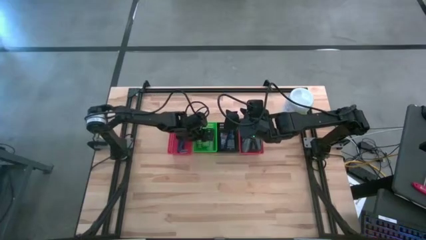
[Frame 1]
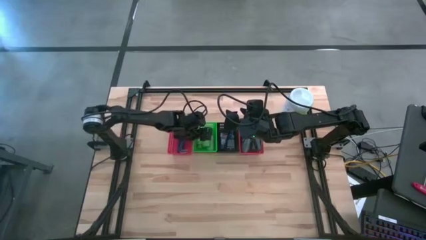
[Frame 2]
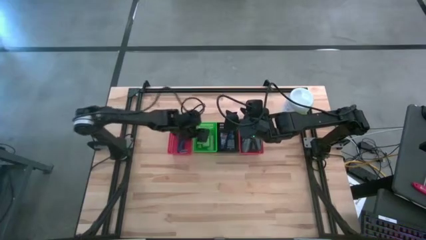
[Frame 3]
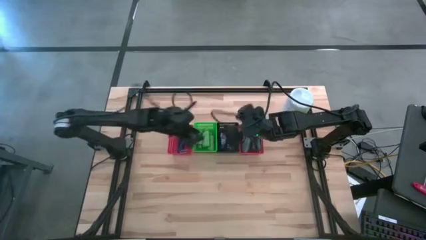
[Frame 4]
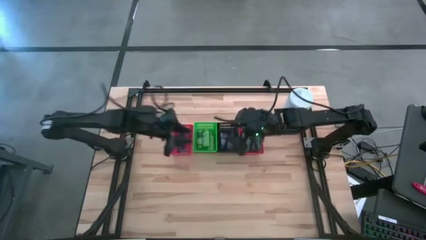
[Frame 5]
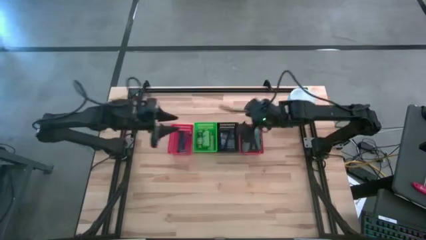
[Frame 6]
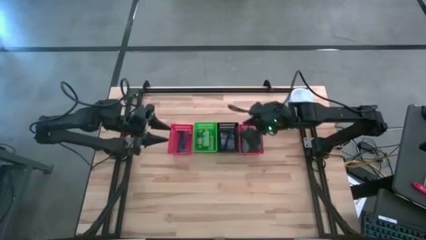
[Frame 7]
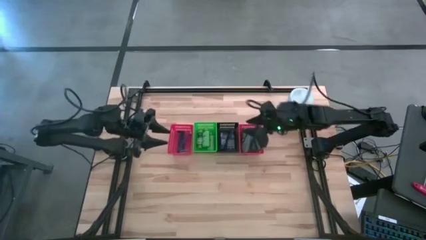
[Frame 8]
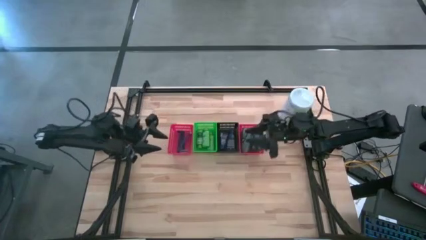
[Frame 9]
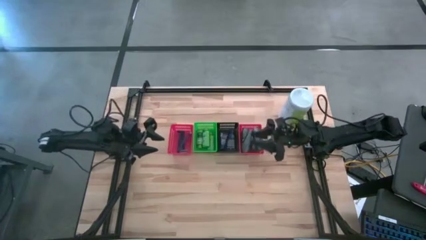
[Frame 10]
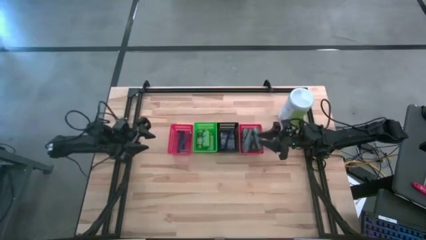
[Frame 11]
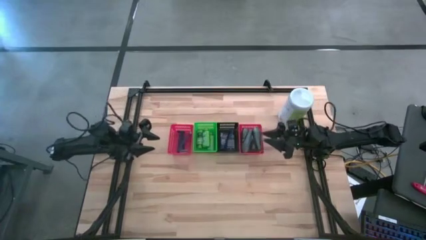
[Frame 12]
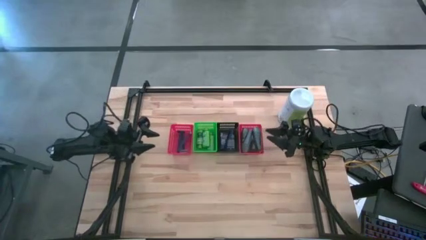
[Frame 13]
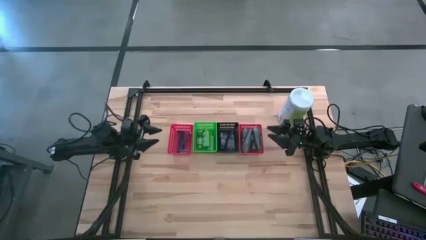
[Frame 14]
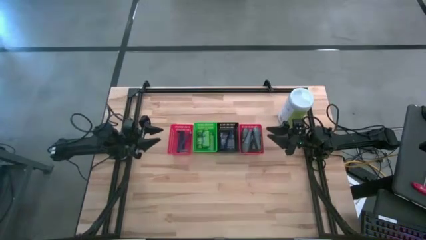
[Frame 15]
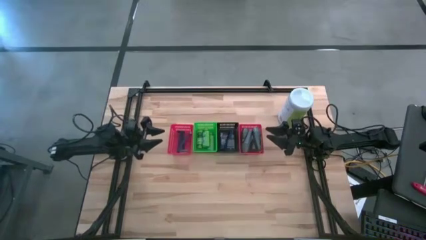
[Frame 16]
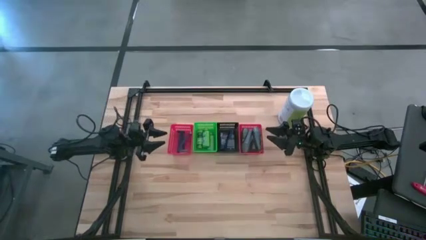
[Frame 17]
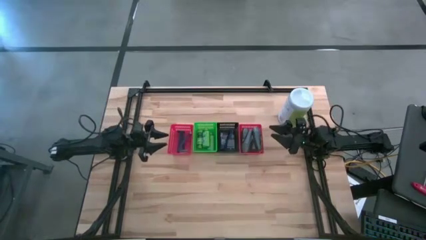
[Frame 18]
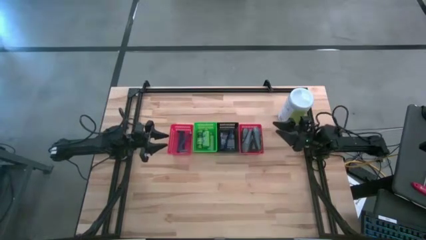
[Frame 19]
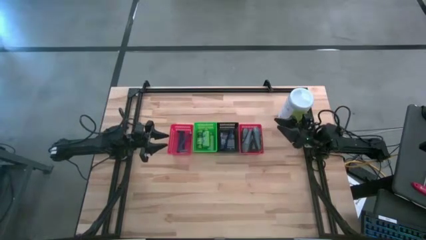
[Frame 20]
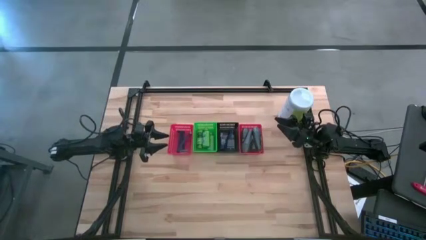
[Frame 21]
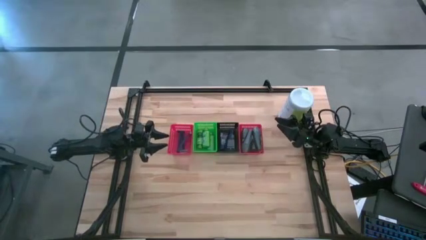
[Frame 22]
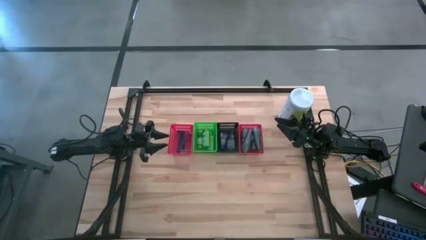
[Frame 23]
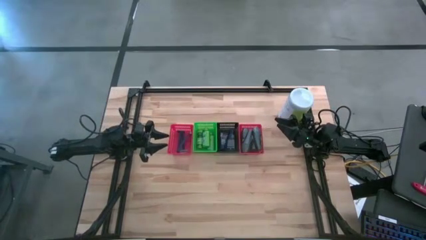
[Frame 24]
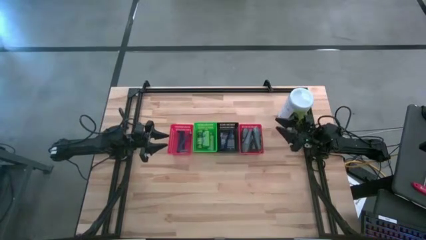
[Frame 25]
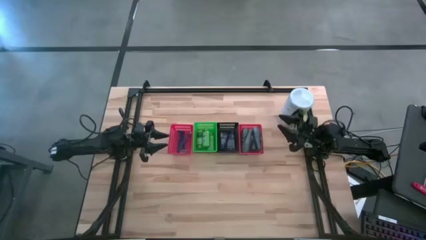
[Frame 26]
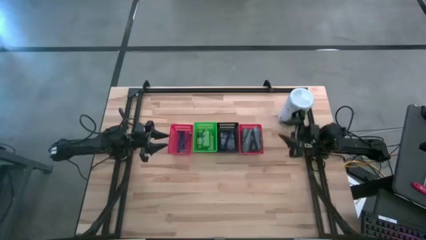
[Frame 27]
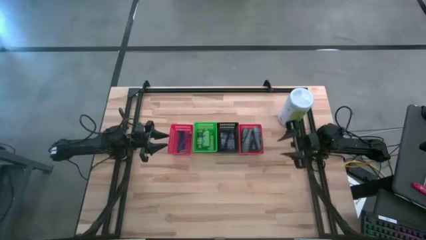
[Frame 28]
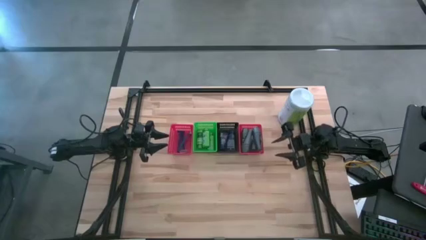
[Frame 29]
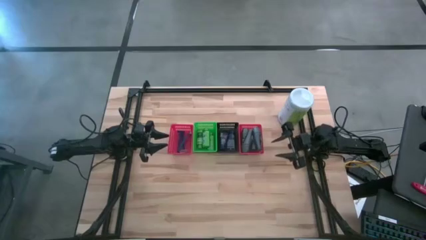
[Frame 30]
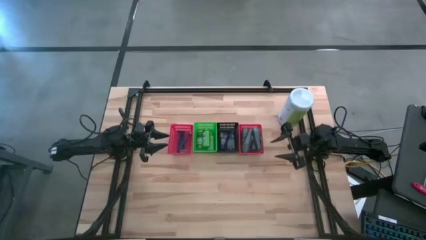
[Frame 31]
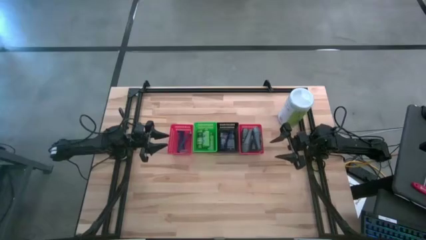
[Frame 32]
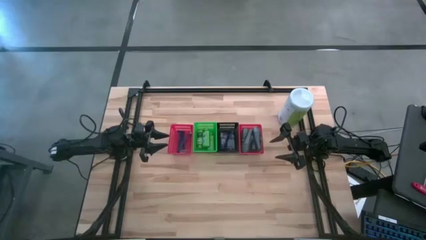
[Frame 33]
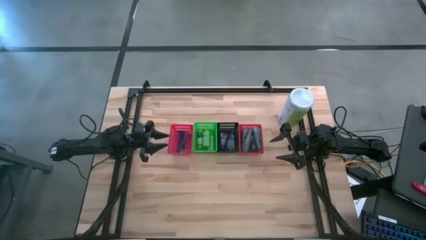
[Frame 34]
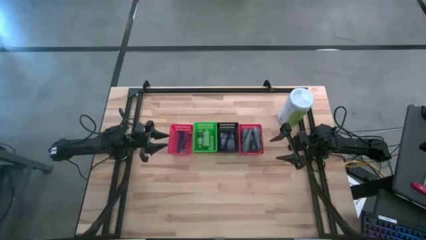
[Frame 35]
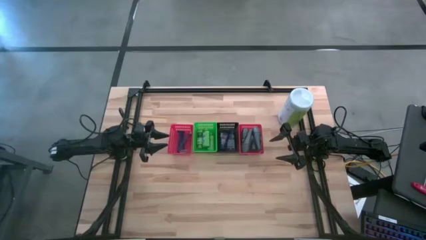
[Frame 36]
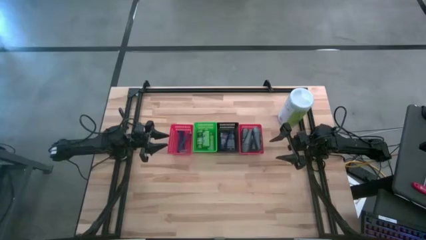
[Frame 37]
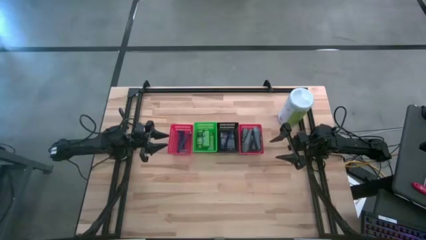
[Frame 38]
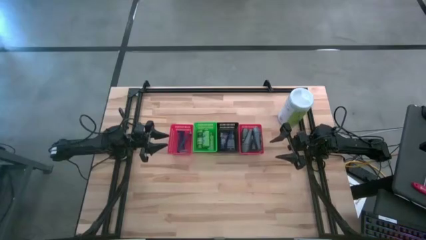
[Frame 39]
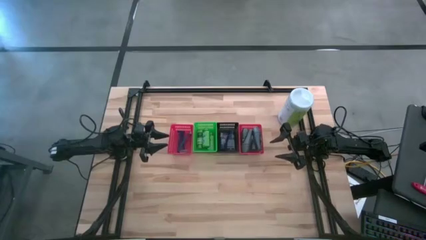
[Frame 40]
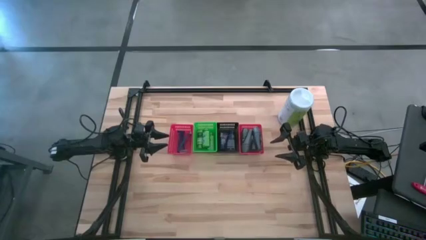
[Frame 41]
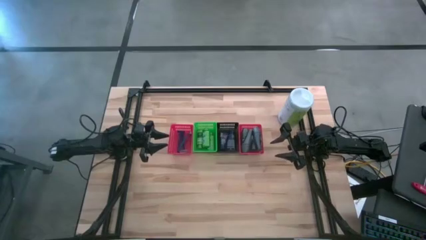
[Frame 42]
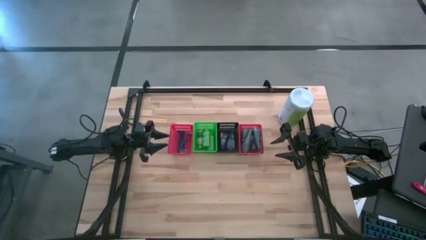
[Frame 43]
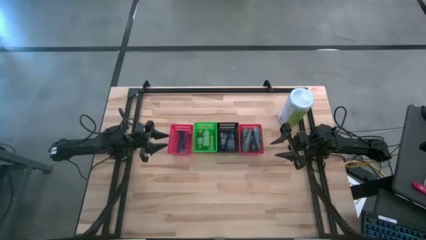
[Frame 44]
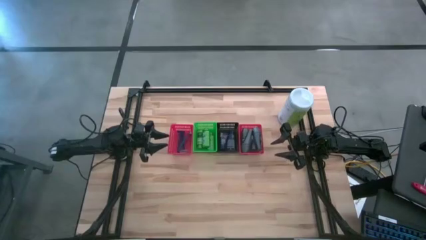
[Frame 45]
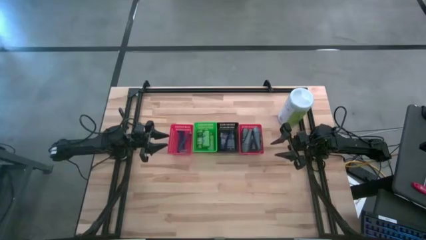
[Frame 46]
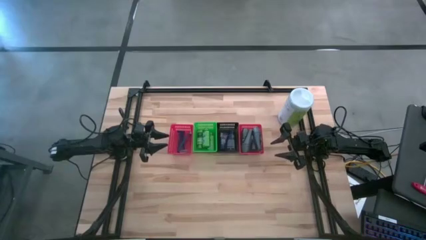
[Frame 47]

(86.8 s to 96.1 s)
Task: Pick & Place Travel size toiletries
Return to Home Position

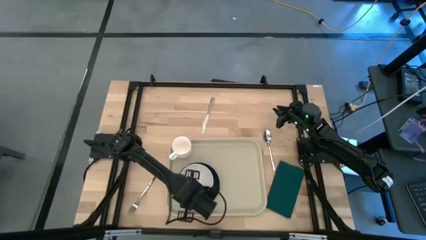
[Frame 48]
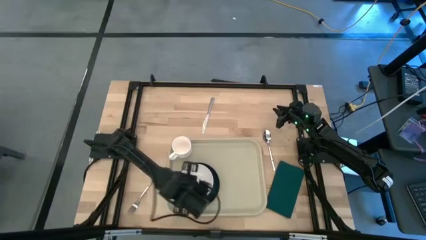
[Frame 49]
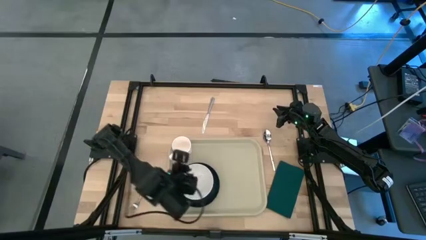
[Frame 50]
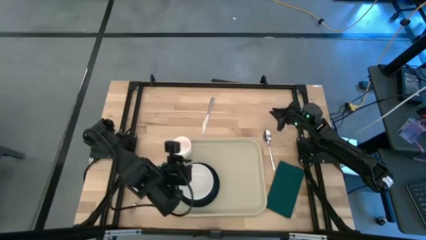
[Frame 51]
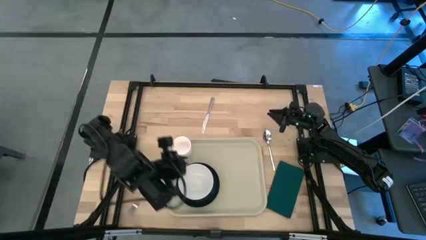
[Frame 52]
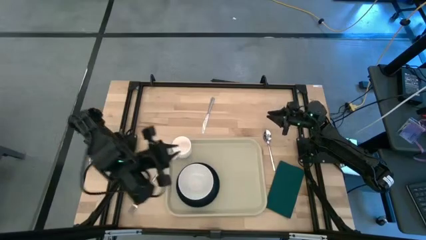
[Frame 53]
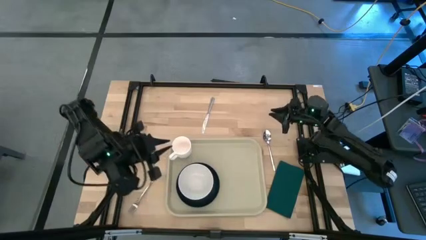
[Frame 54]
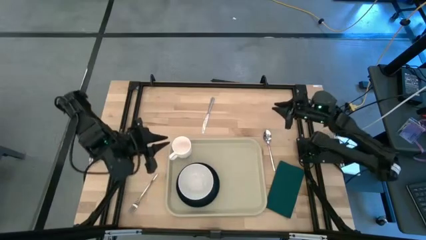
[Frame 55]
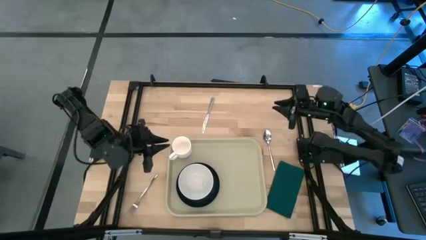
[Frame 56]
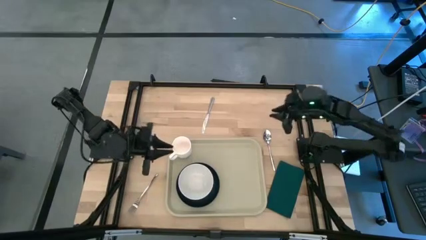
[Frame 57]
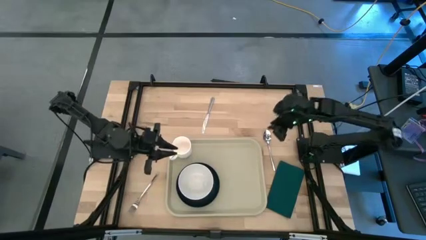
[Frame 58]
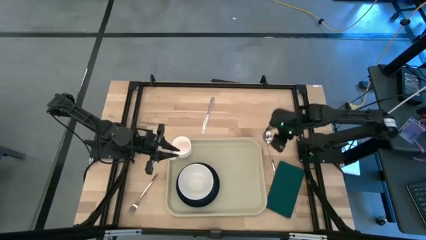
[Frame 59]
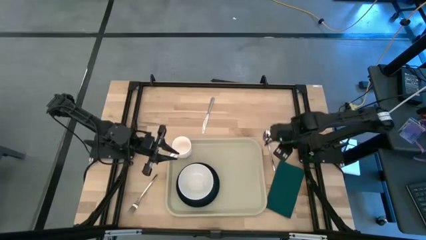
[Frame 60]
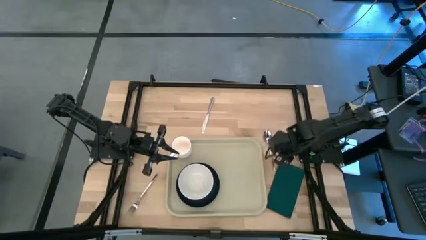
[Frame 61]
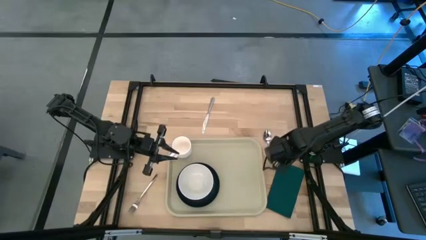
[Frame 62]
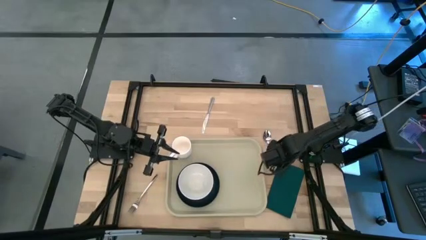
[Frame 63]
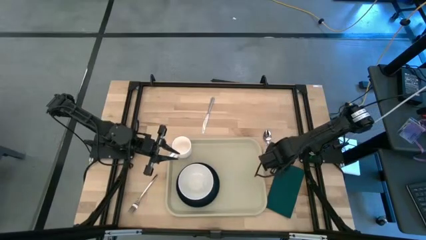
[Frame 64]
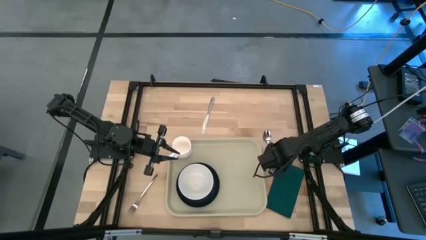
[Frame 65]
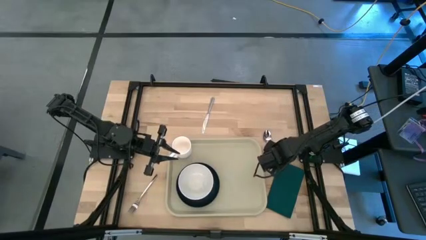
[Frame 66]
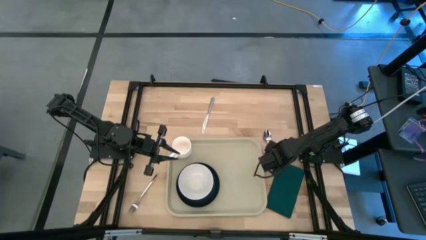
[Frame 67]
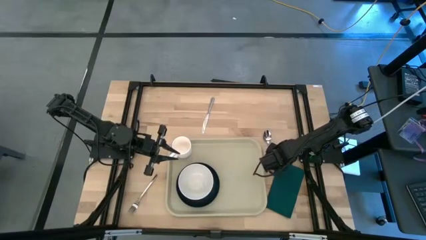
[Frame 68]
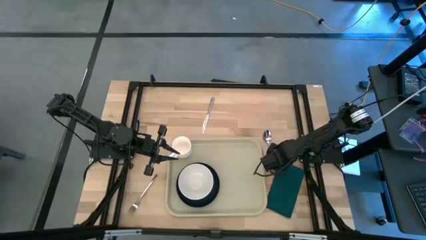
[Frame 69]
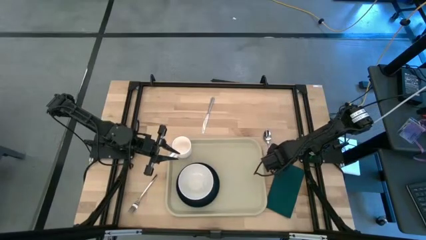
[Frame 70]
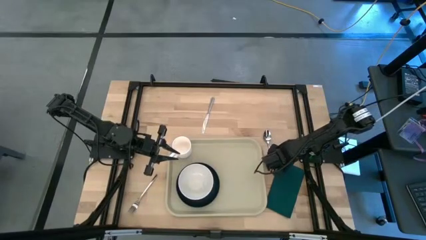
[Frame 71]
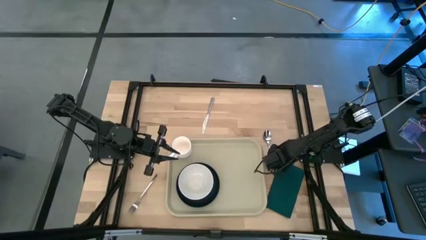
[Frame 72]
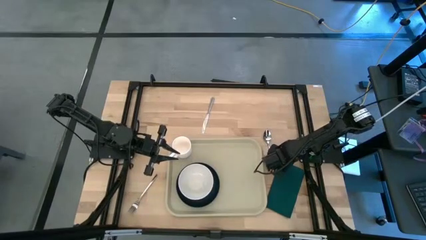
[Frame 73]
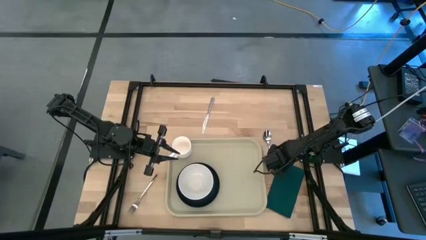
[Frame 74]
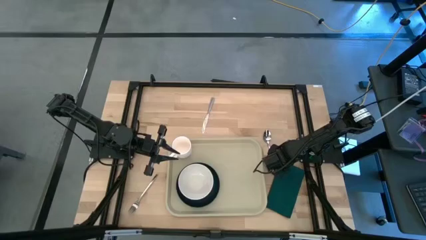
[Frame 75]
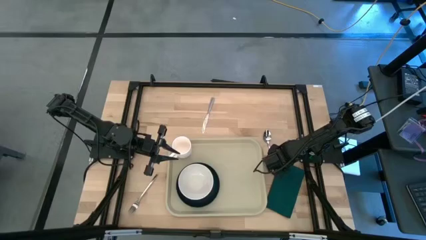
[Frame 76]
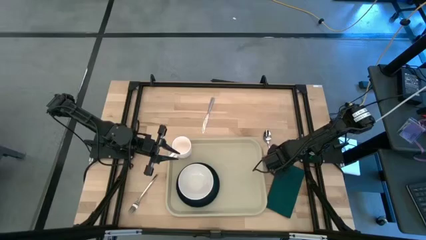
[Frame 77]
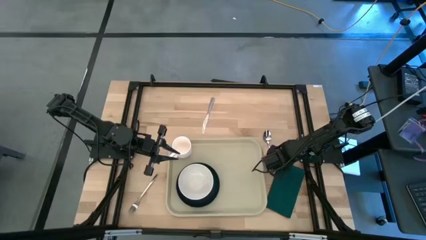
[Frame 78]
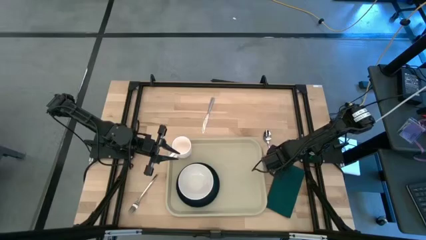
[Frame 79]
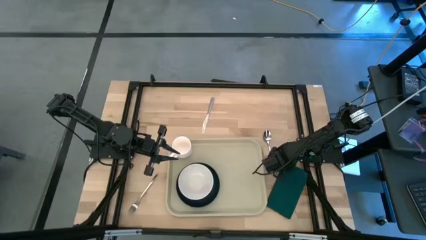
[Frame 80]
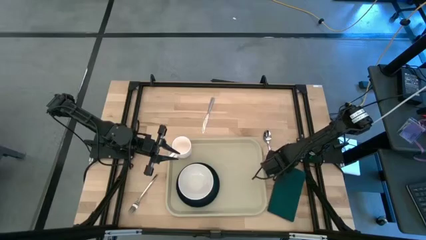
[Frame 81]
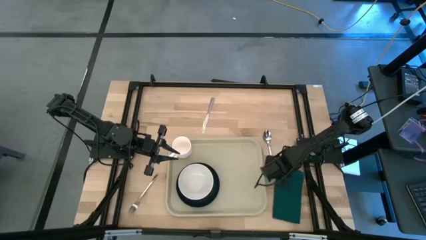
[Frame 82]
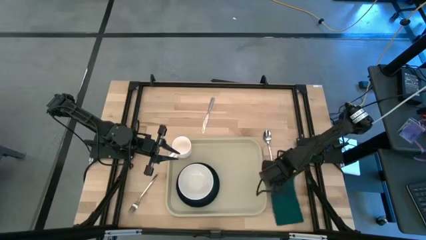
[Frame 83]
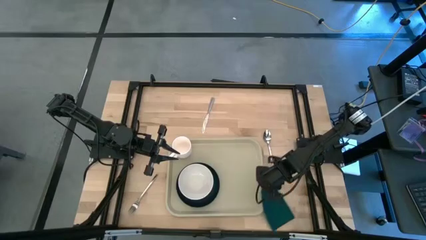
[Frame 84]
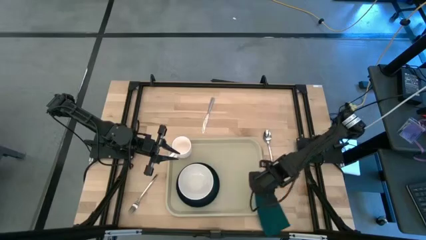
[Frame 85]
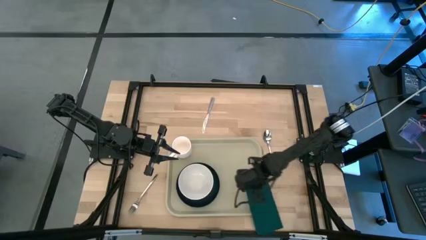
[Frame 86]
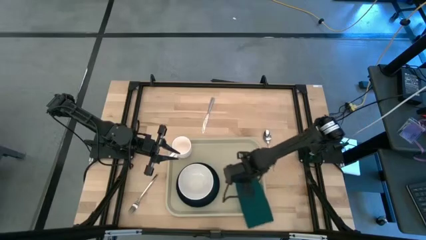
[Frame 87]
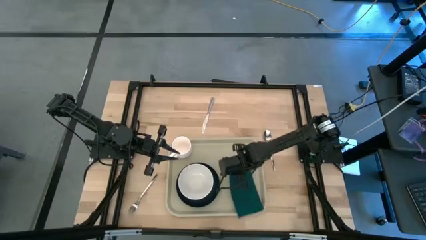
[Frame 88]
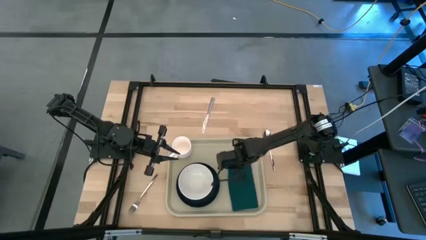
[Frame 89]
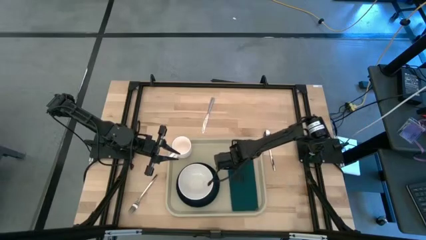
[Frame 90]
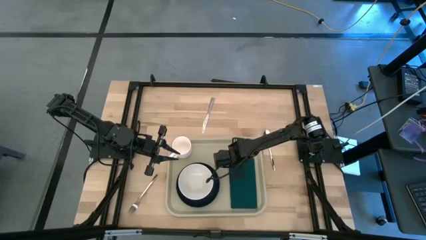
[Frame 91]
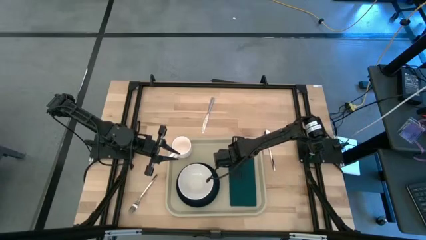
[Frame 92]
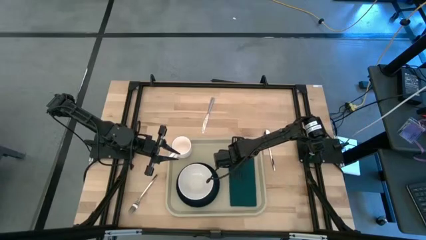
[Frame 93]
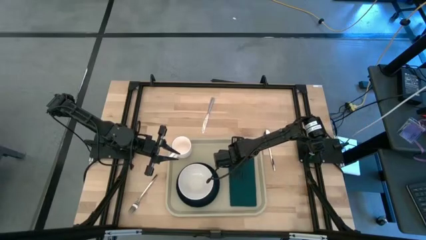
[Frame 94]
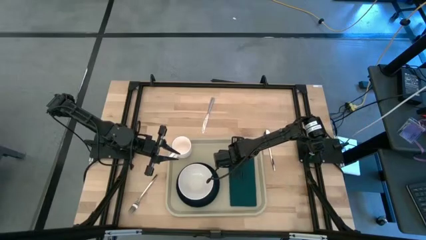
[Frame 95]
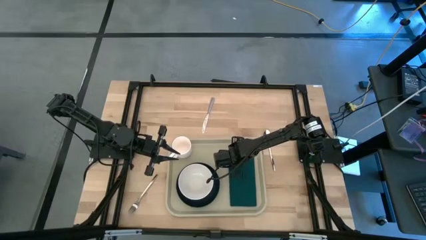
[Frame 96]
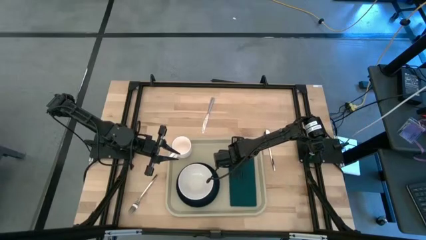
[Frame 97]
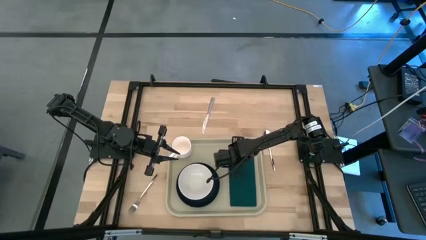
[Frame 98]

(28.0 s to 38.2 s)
Task: Set up tray
Put the folded green napkin on the brown serving tray to the right of the black plate
